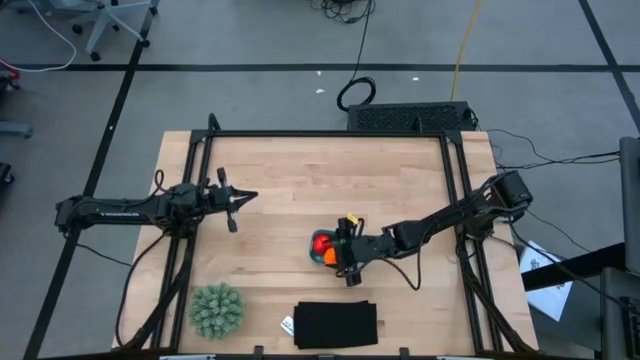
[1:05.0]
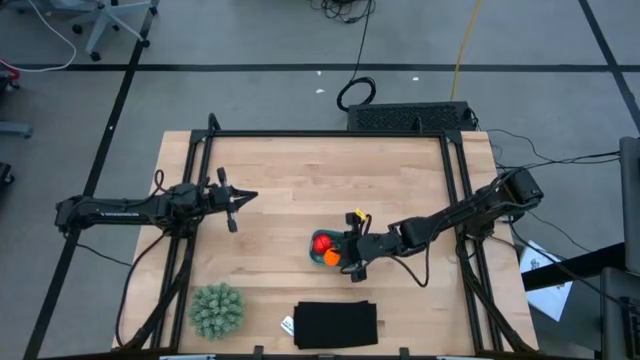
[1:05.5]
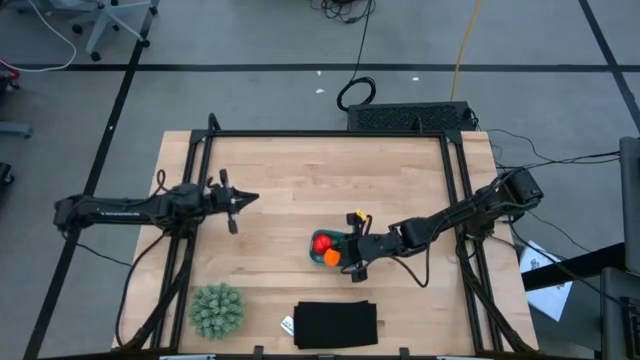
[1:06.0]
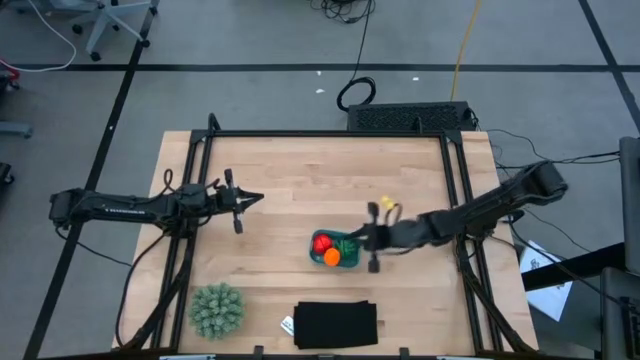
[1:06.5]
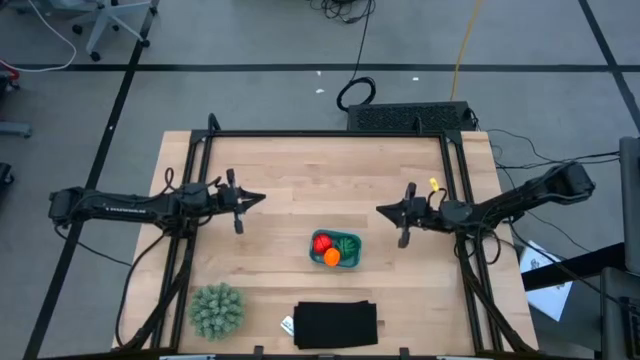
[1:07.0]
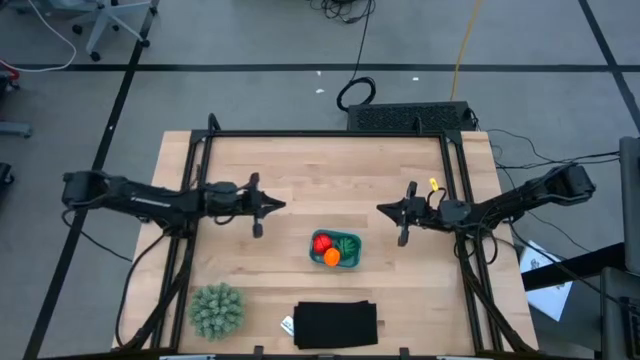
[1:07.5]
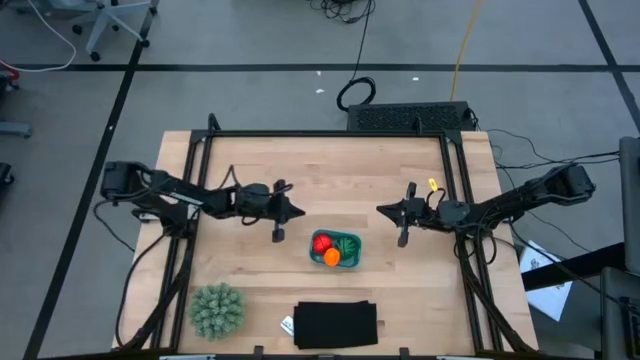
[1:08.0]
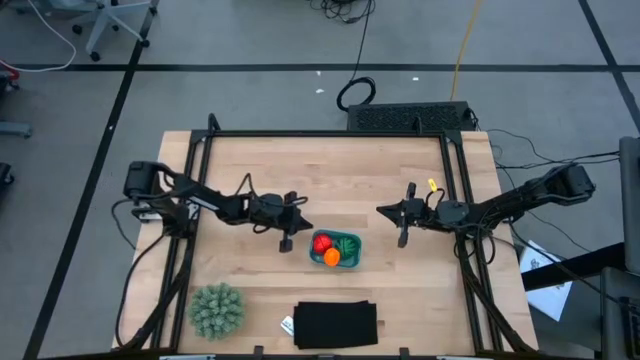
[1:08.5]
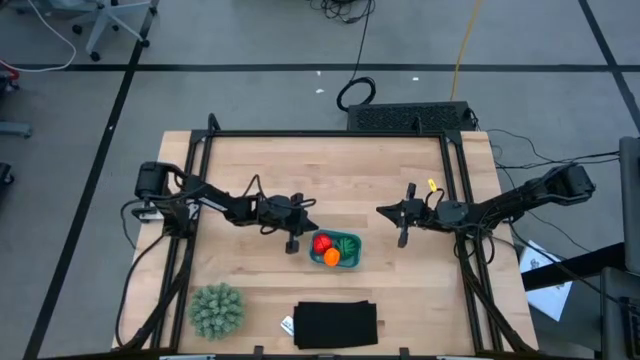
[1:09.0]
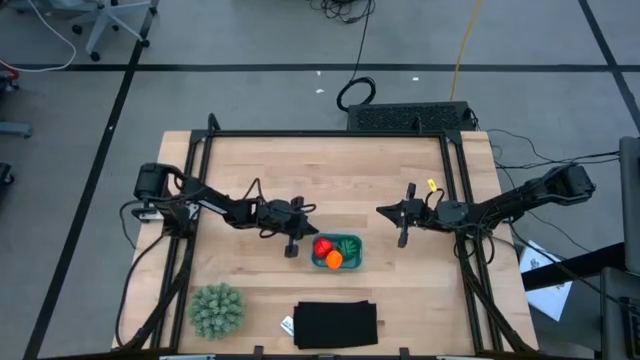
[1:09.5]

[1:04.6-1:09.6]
Task: Pick and placing Produce into tupperware
Adjust the blue bin on the table

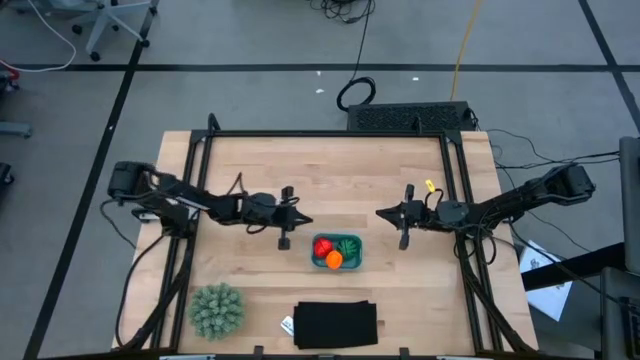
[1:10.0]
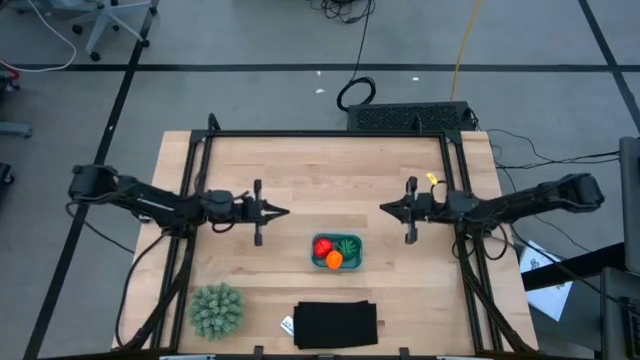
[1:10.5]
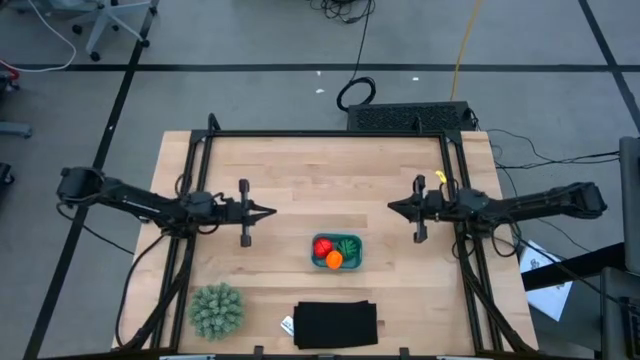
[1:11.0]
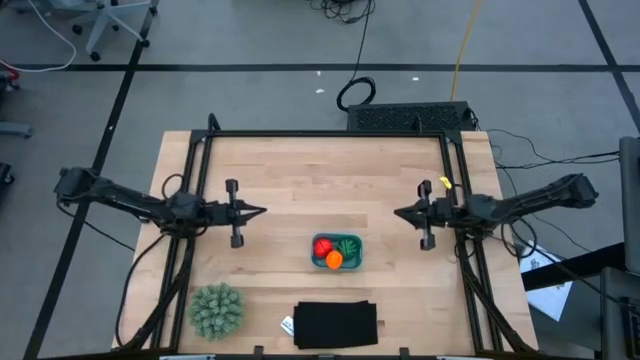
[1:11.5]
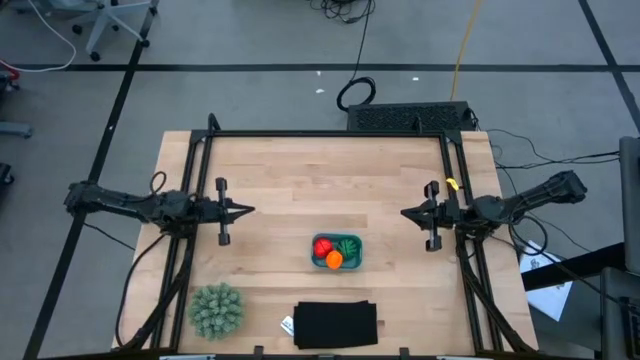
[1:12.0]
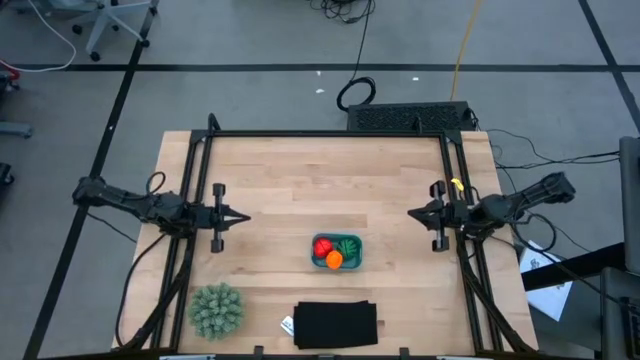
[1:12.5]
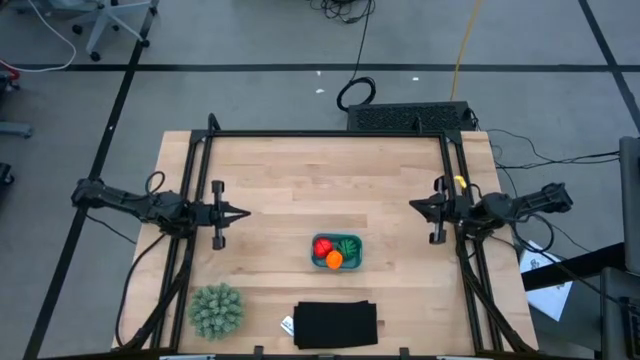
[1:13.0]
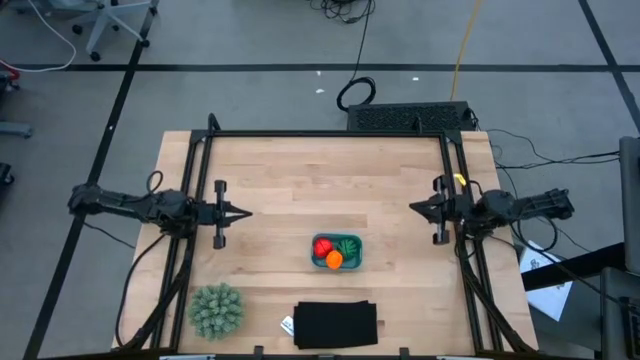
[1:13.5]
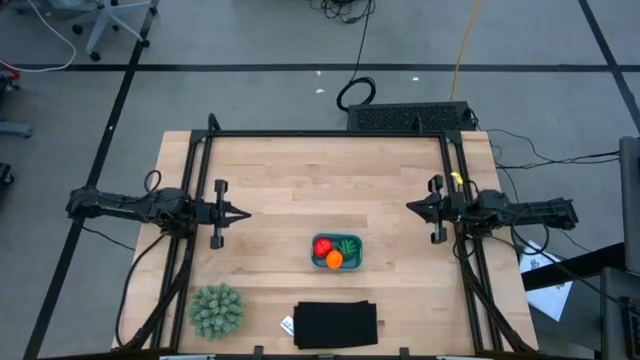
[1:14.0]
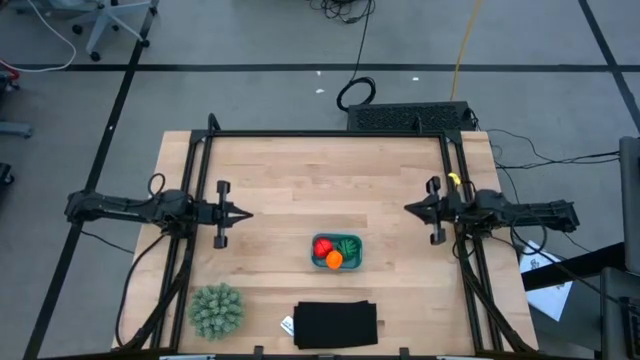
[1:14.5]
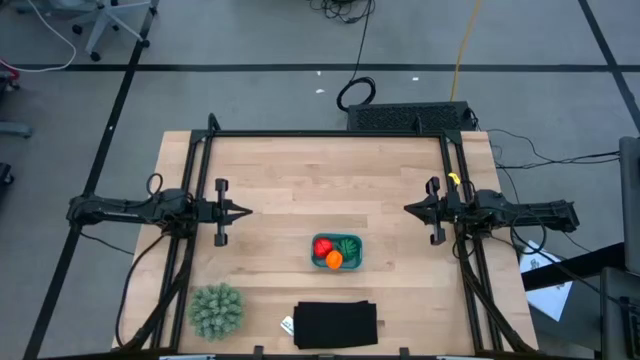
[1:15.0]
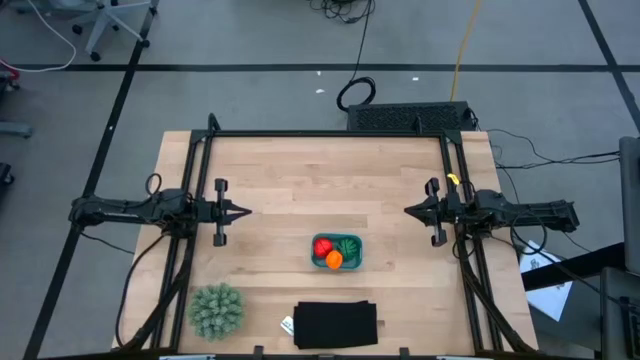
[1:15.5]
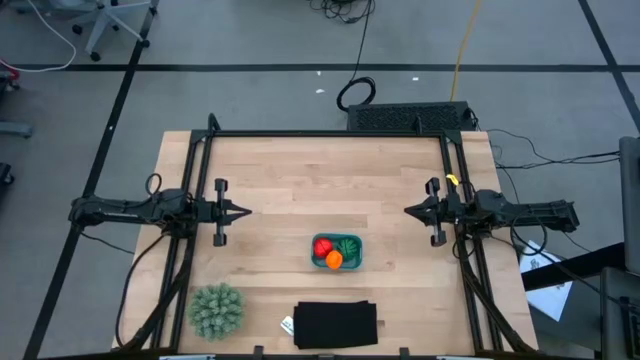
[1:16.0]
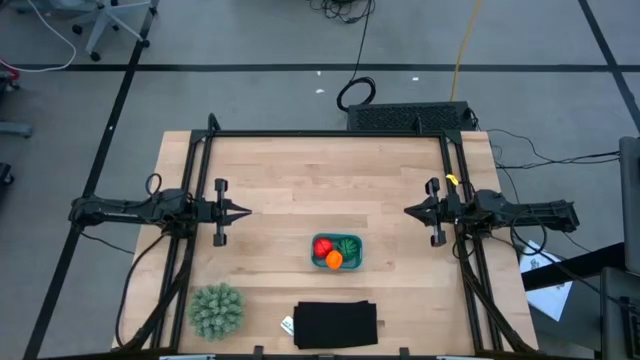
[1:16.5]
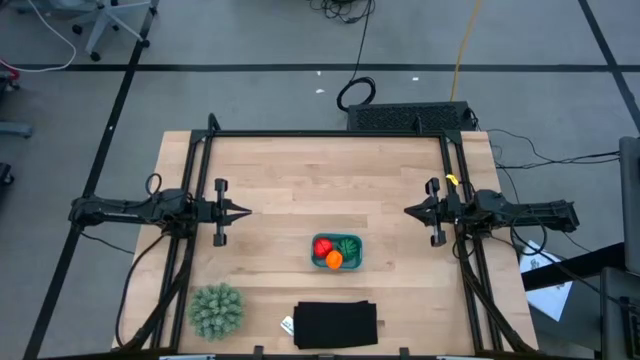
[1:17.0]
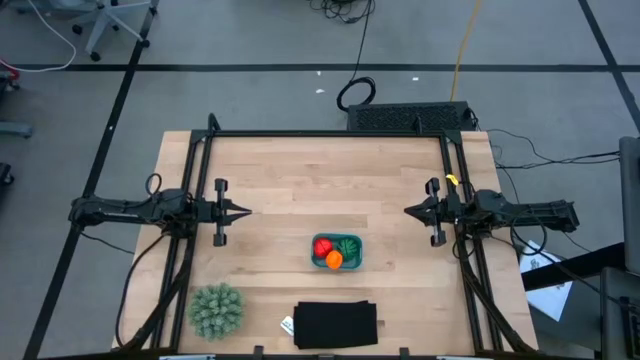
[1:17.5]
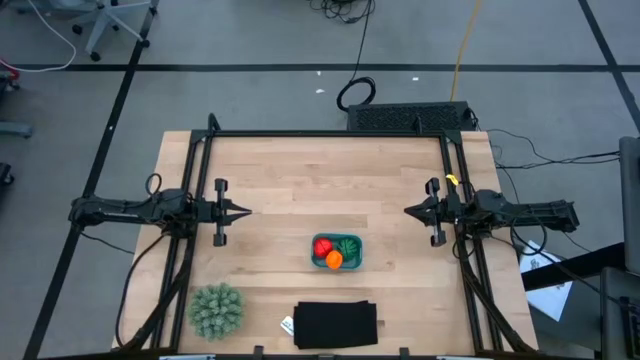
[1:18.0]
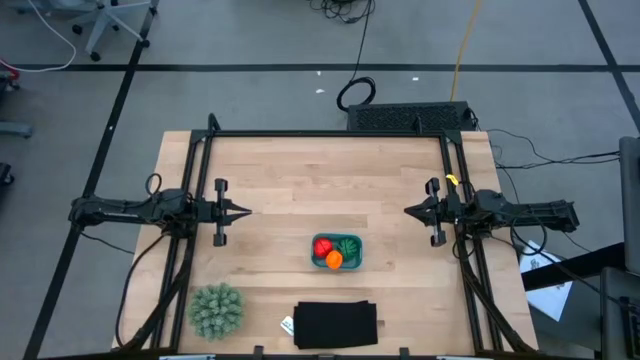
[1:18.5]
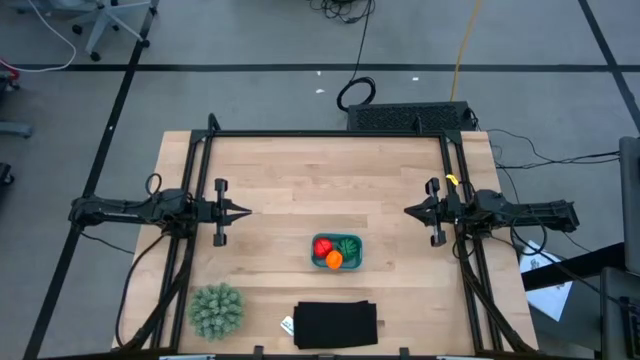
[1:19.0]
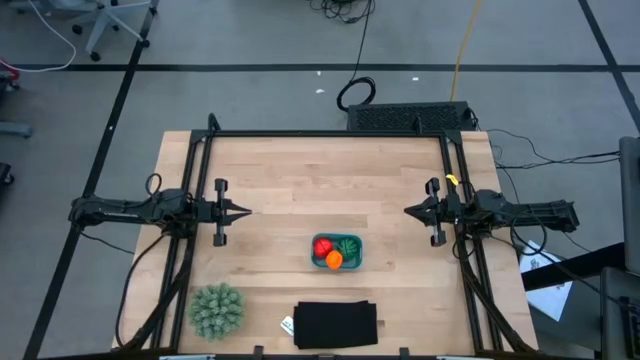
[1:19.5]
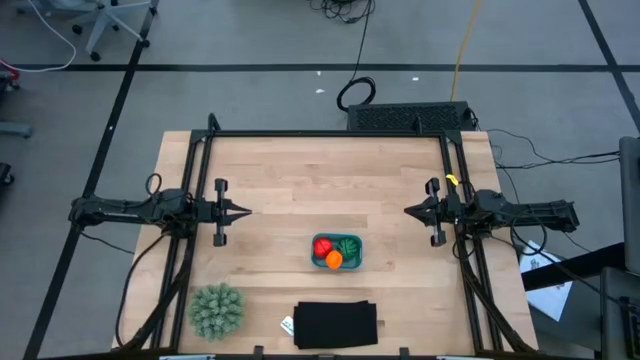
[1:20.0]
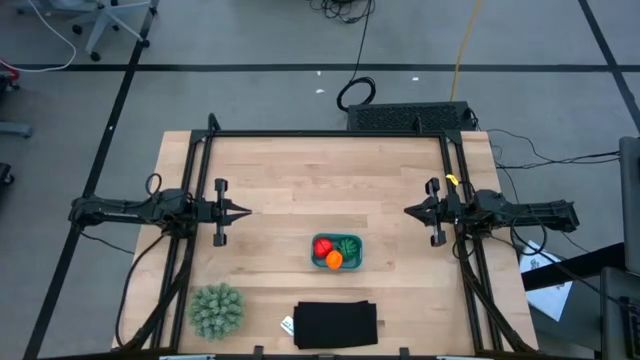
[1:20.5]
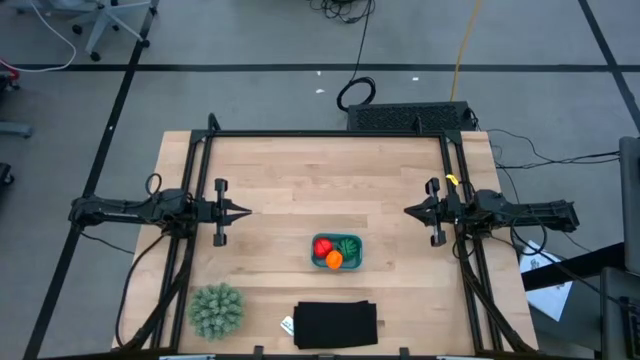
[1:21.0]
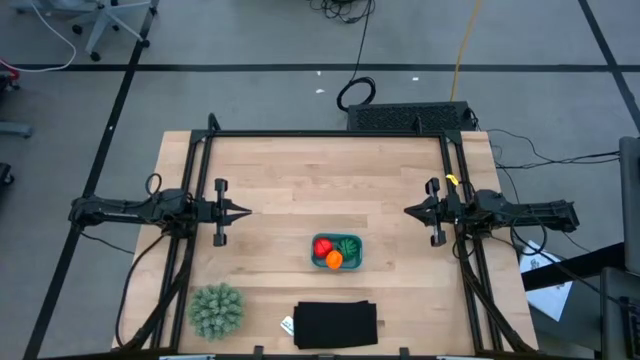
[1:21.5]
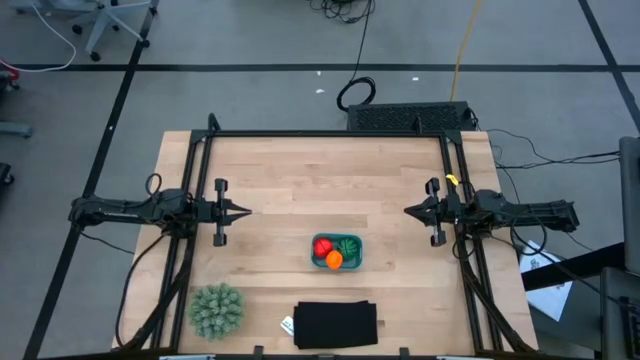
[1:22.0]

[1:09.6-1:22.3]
Return to Home Position

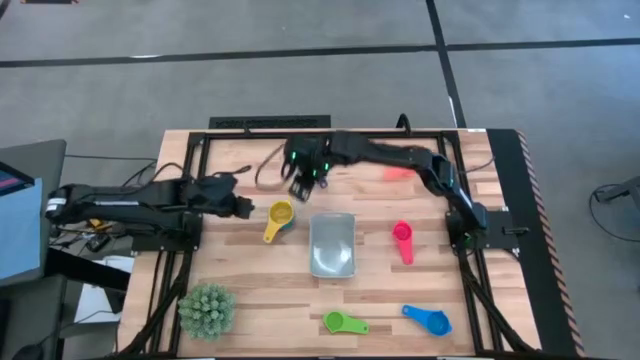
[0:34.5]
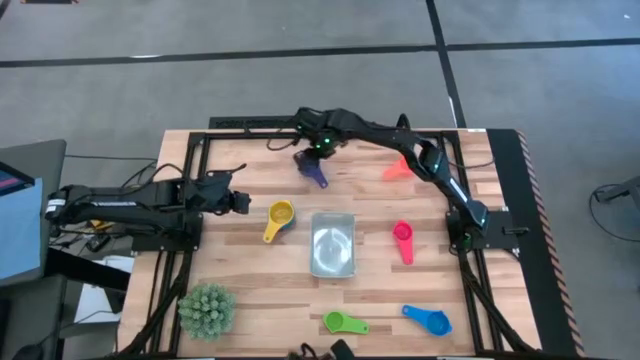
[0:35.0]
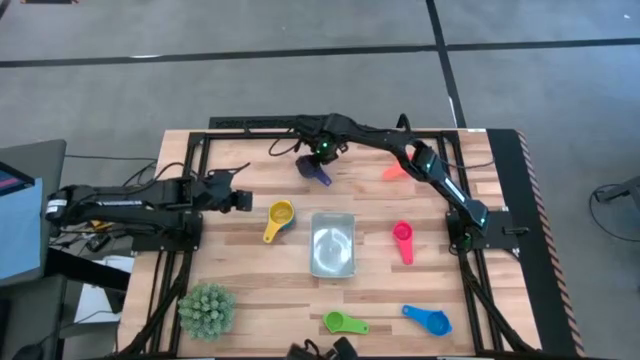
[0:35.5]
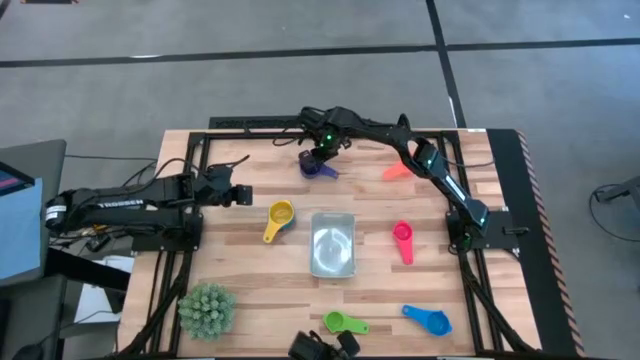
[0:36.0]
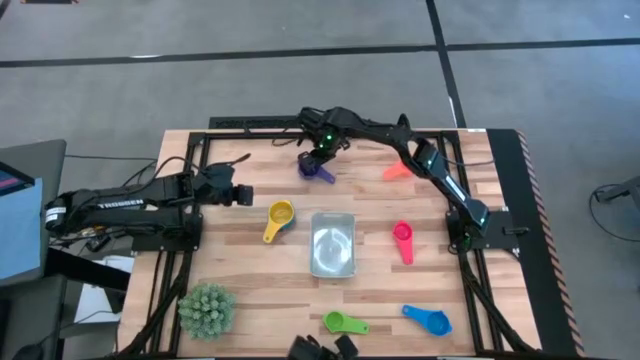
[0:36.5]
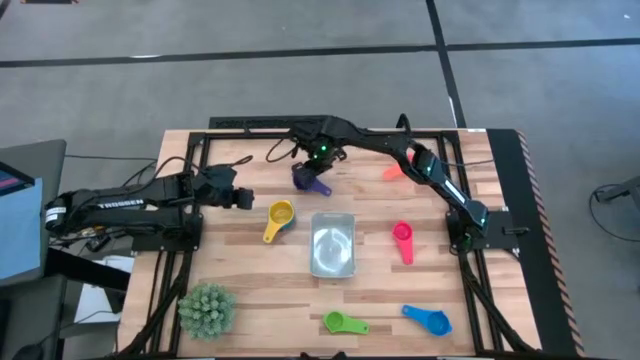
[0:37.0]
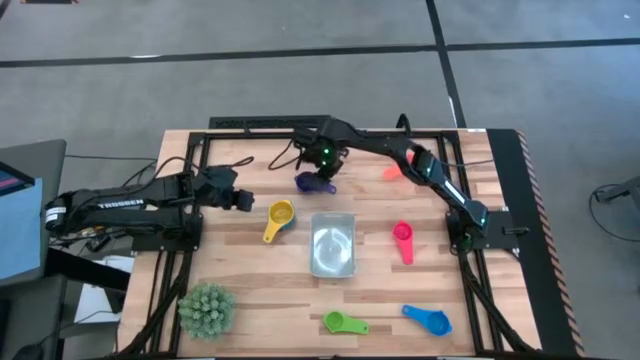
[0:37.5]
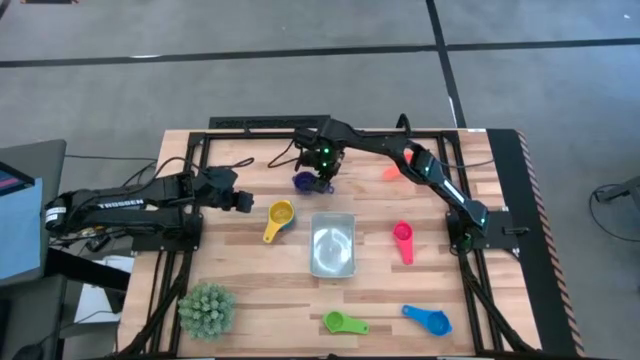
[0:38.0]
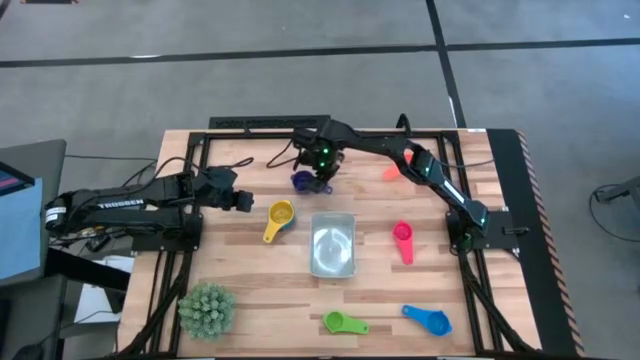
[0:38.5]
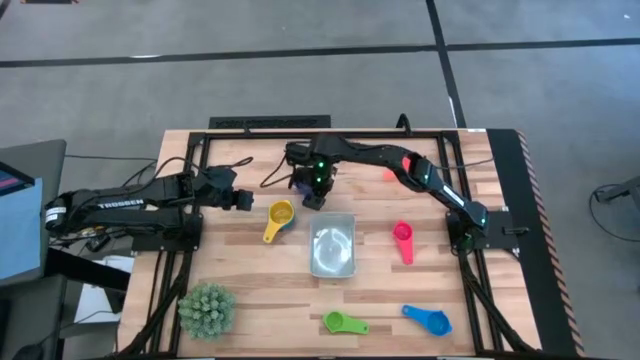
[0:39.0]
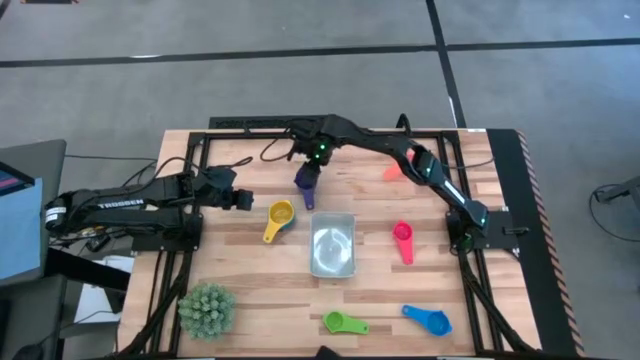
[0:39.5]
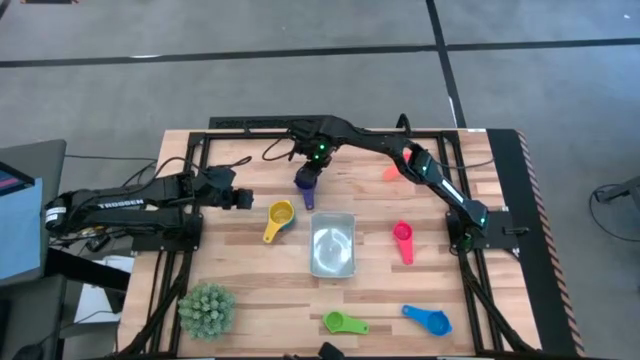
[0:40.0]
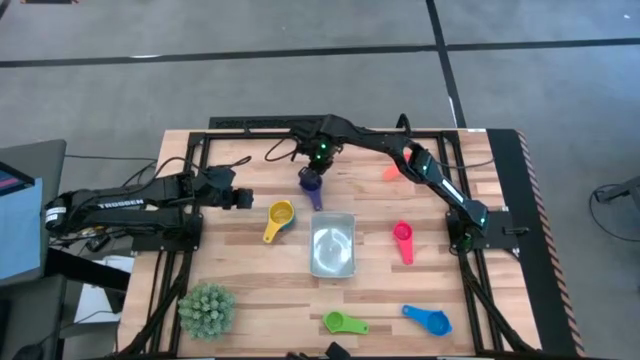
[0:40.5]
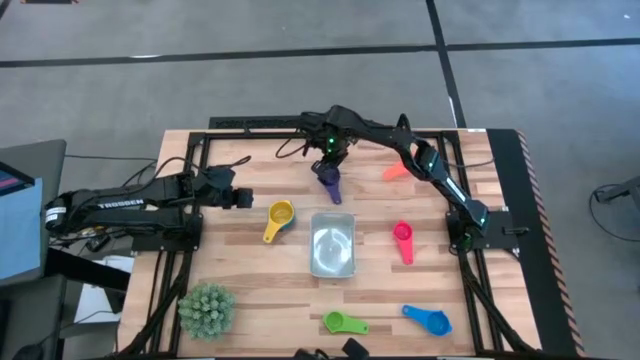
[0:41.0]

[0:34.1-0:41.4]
Task: Nest measuring cups in basket
Stack the dark blue measuring cup on top of the yellow measuring cup
